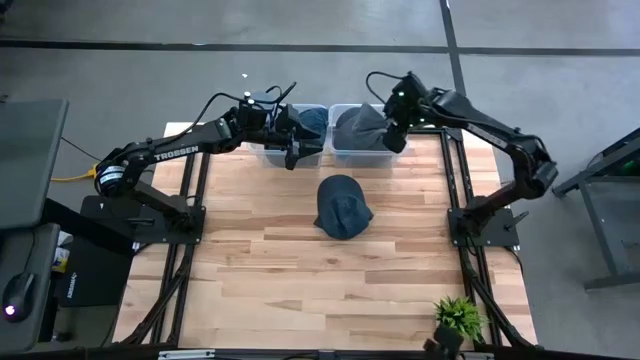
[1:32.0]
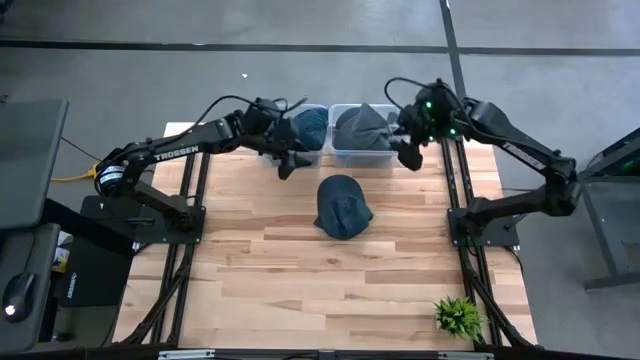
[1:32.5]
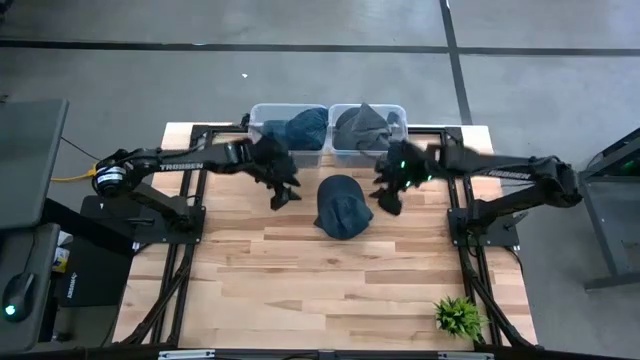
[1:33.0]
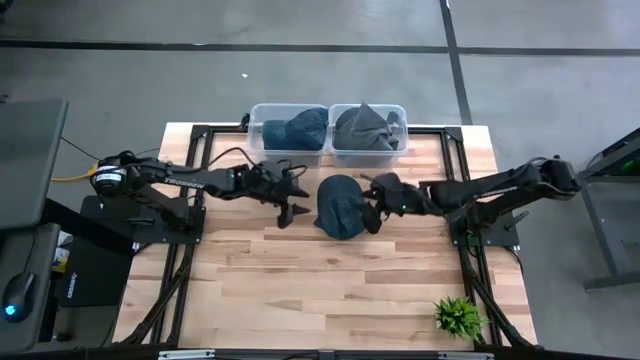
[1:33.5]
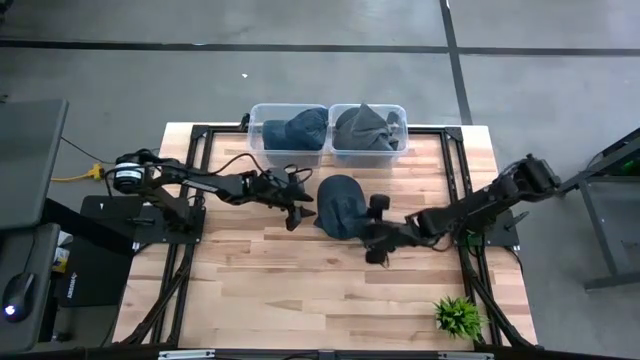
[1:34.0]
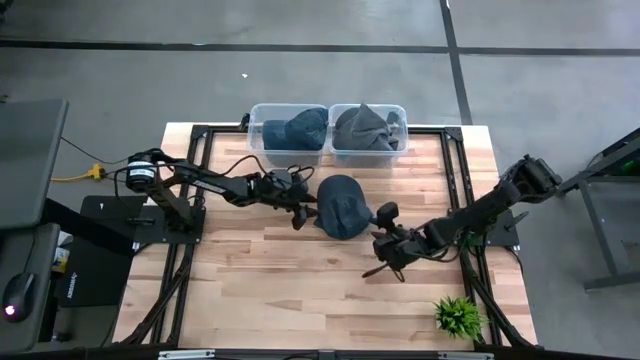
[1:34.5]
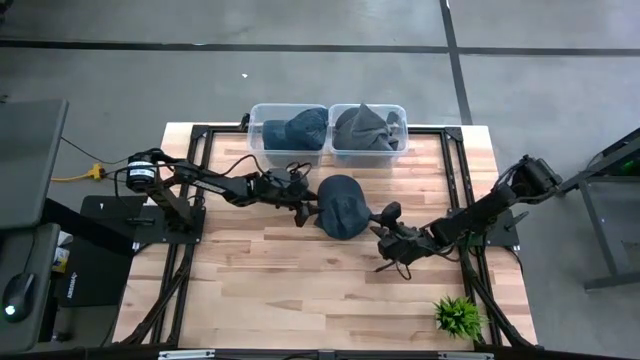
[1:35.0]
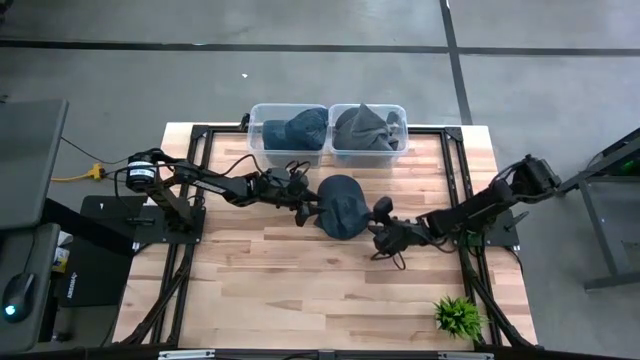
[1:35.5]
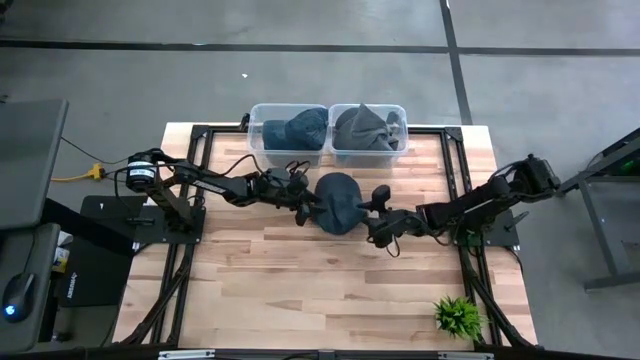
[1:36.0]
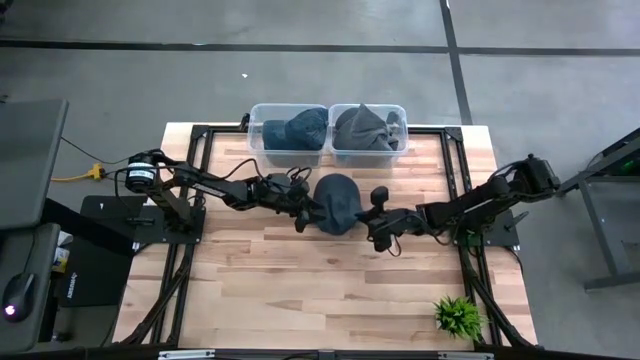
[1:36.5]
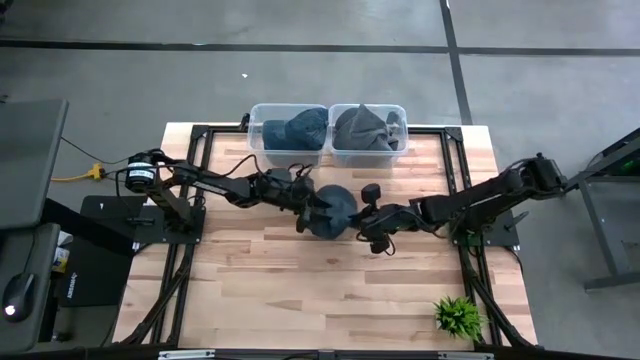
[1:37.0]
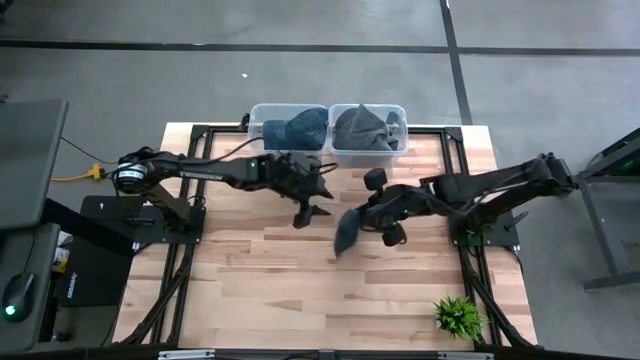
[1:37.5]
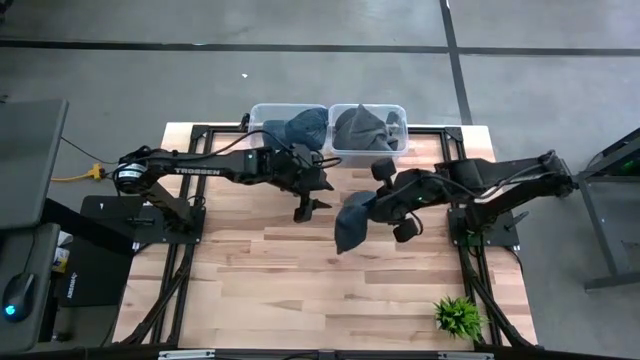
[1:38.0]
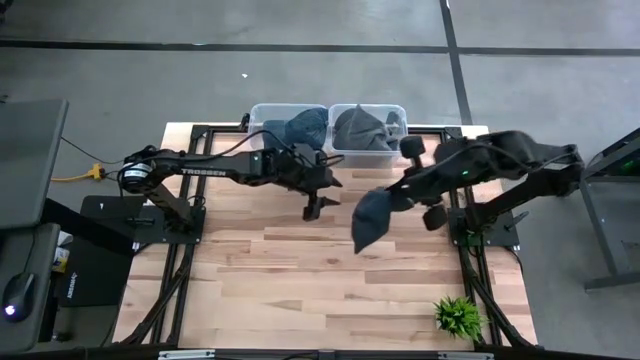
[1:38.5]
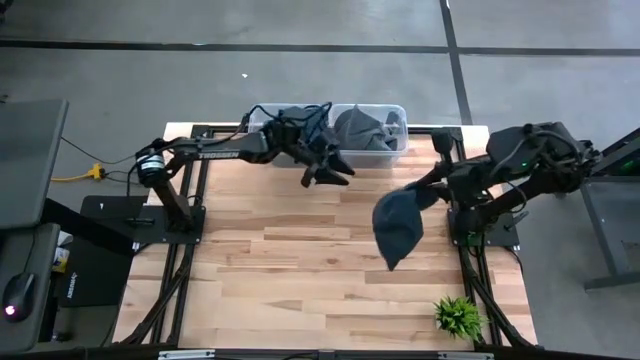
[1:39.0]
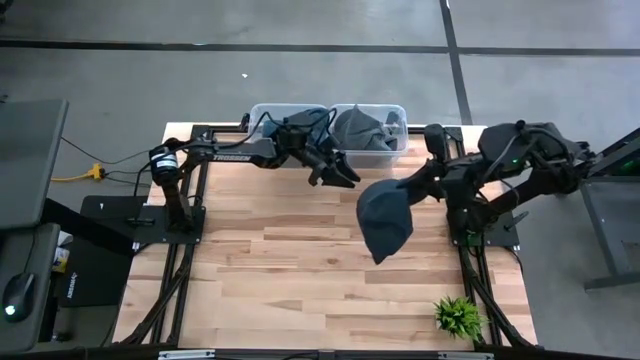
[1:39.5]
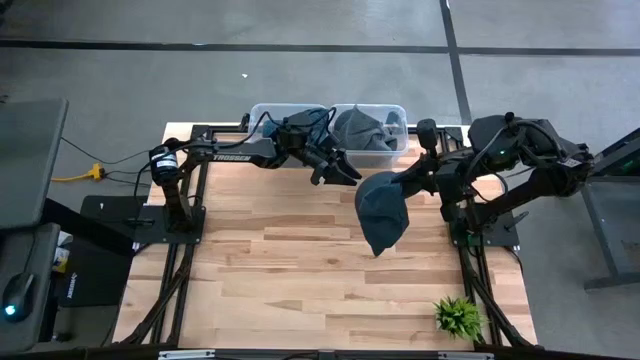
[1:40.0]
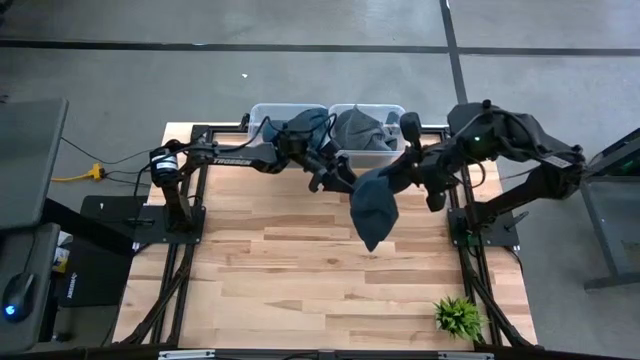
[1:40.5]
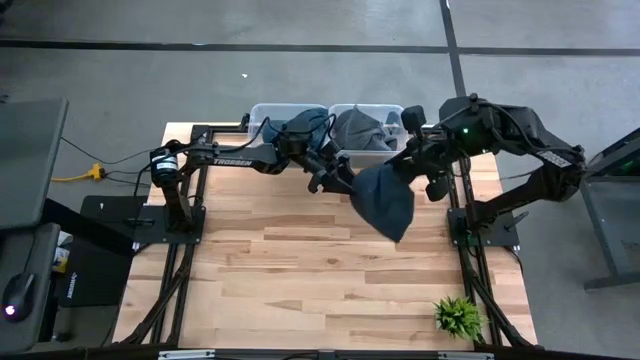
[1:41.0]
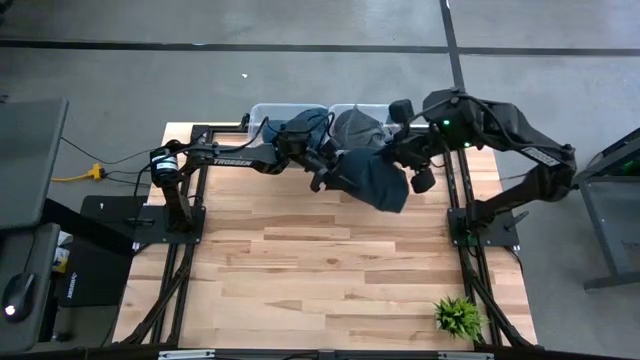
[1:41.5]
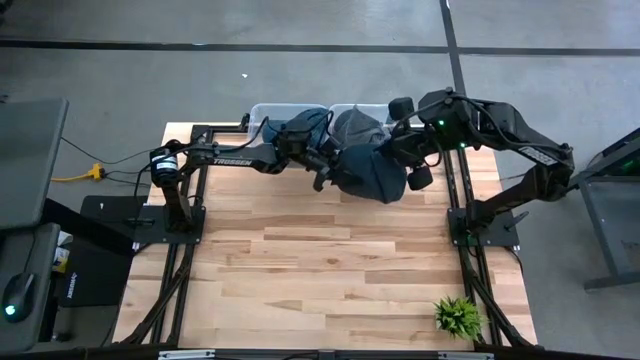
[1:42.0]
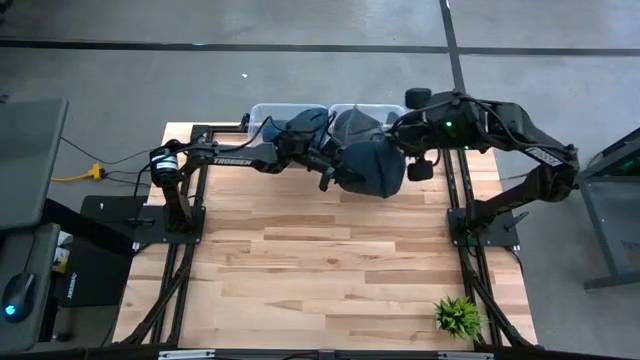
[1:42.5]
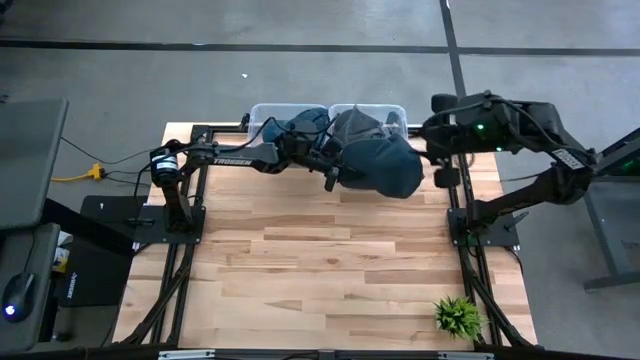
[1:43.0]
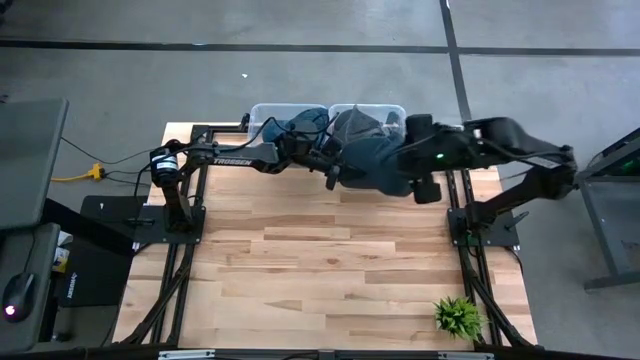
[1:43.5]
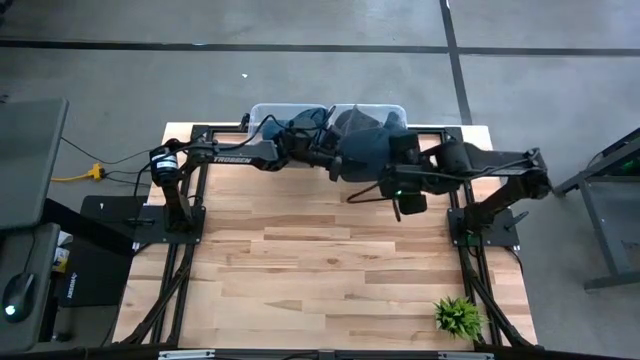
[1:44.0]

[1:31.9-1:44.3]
Task: Pick and place caps into container
Put the blue cap into the left transparent container

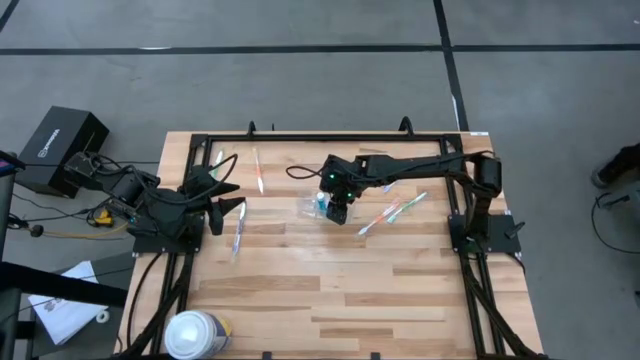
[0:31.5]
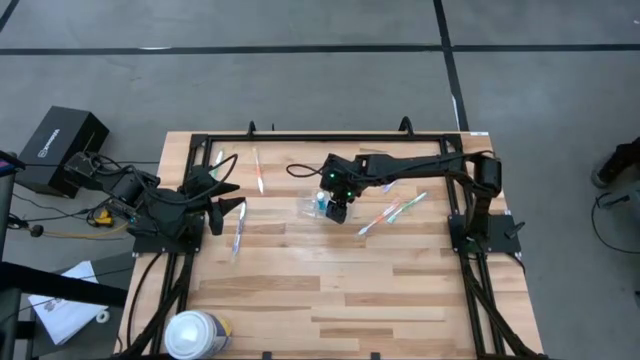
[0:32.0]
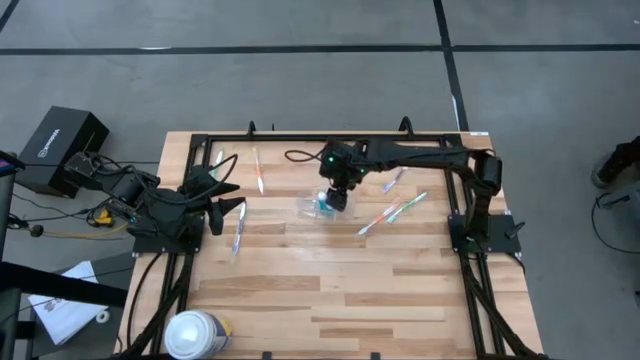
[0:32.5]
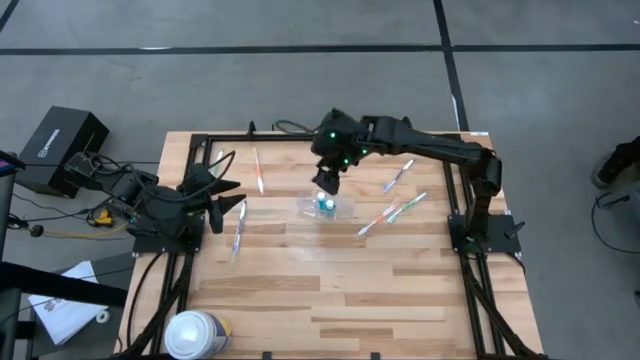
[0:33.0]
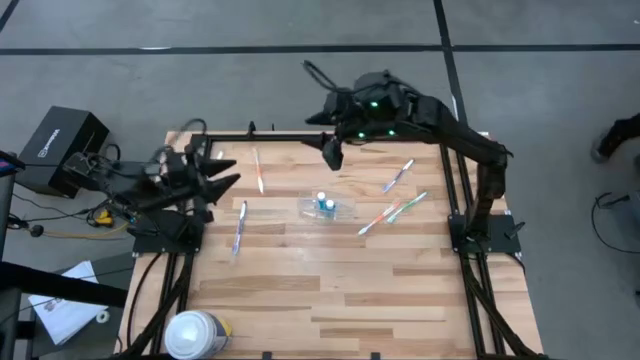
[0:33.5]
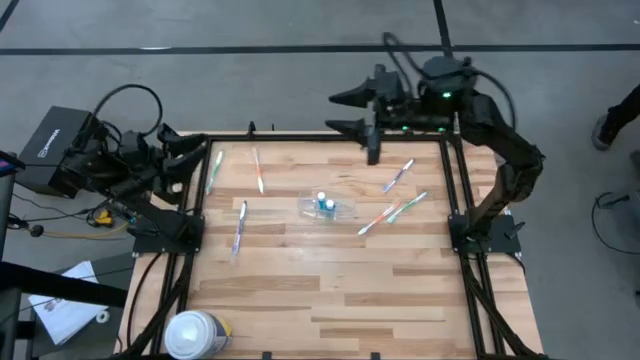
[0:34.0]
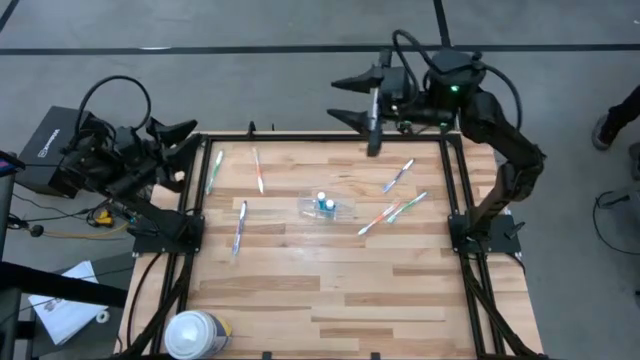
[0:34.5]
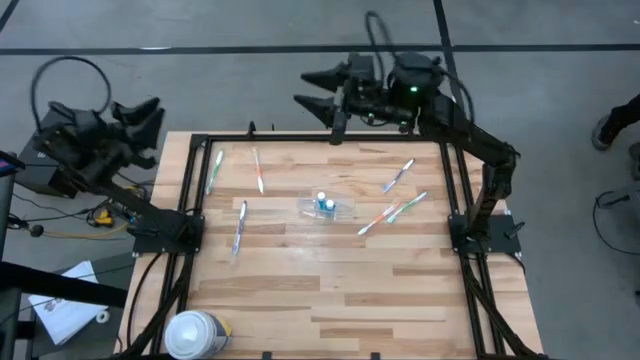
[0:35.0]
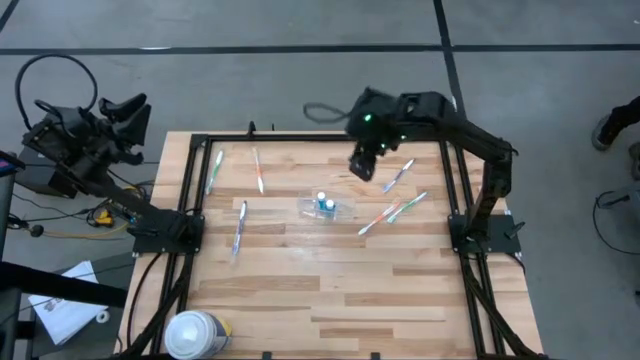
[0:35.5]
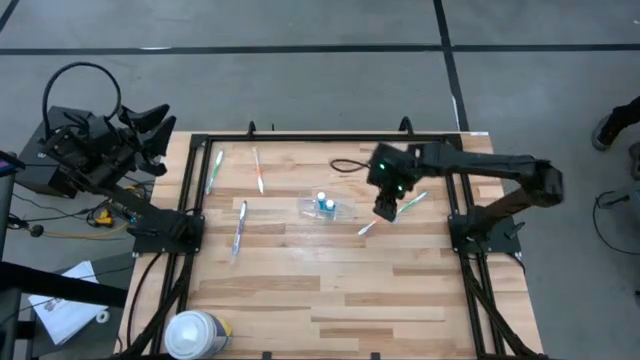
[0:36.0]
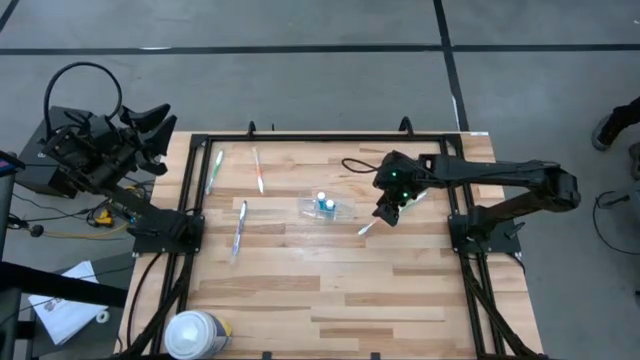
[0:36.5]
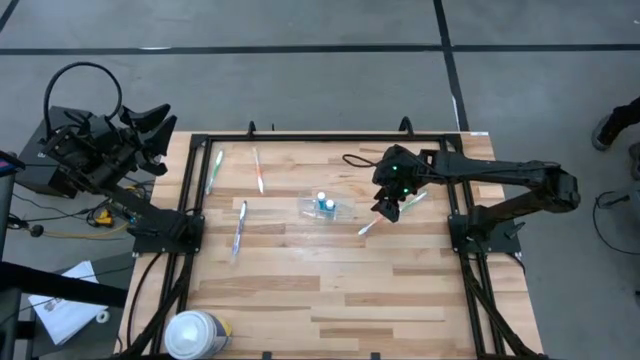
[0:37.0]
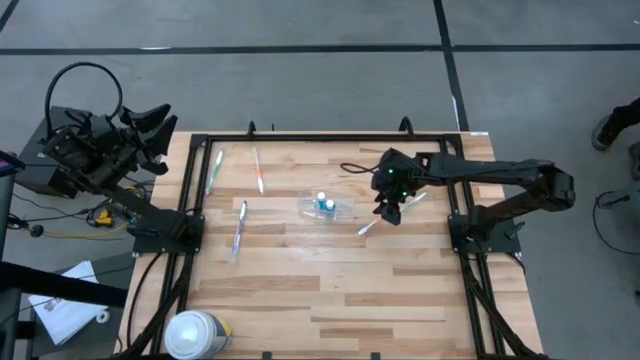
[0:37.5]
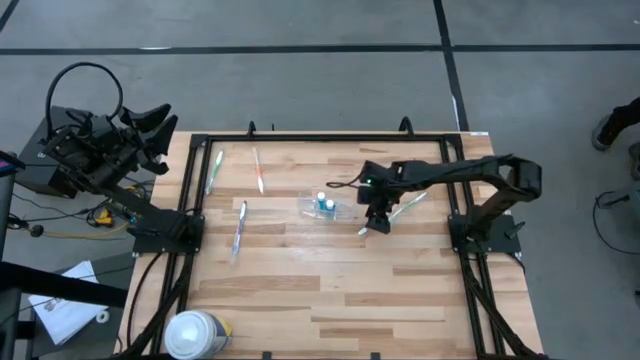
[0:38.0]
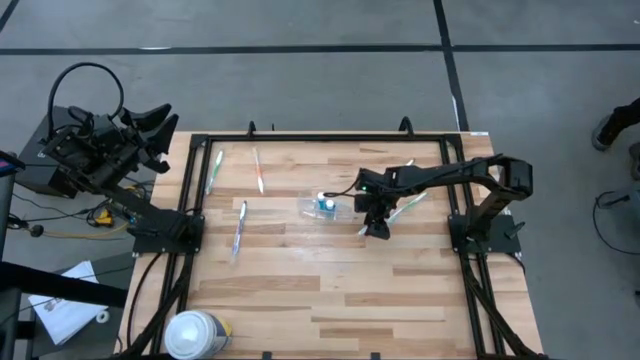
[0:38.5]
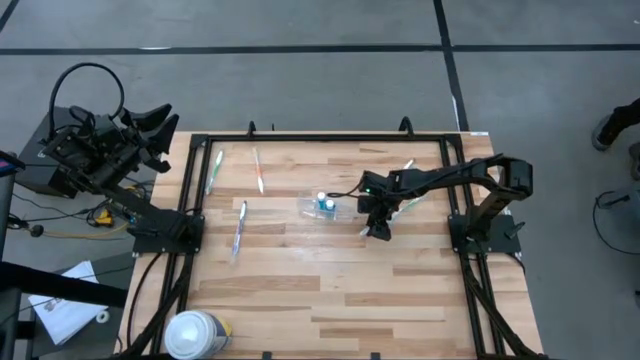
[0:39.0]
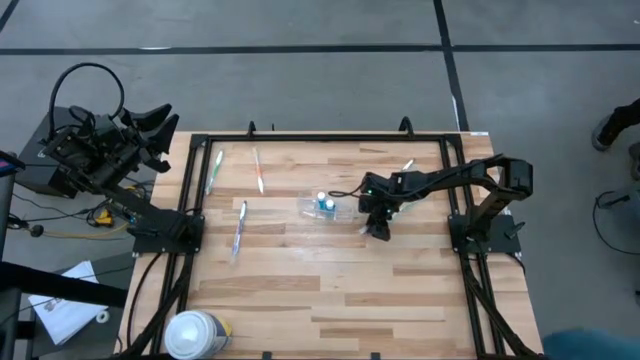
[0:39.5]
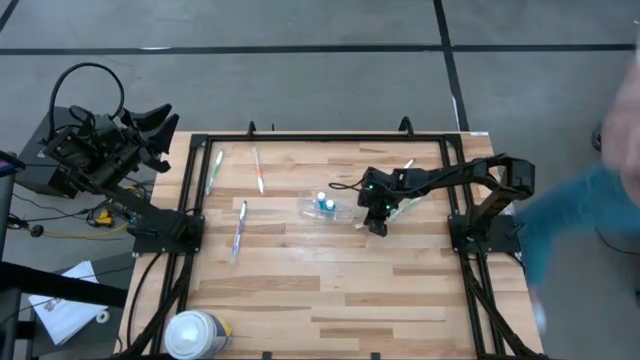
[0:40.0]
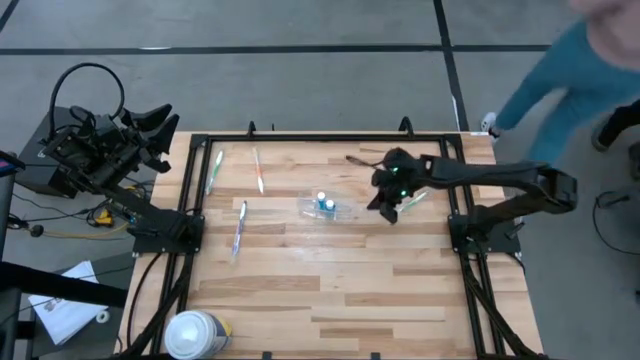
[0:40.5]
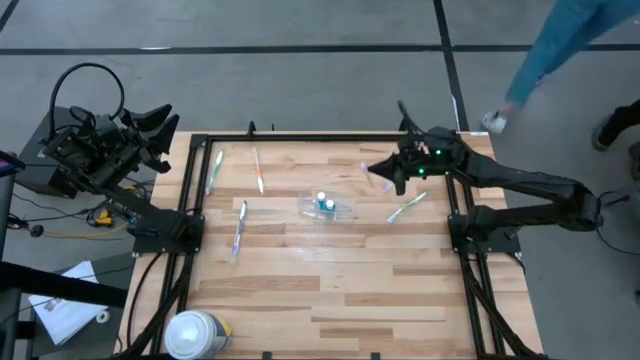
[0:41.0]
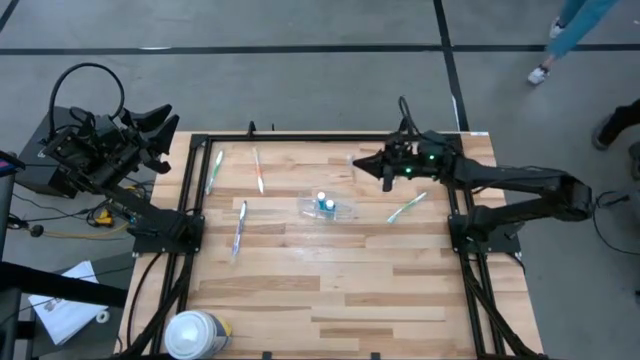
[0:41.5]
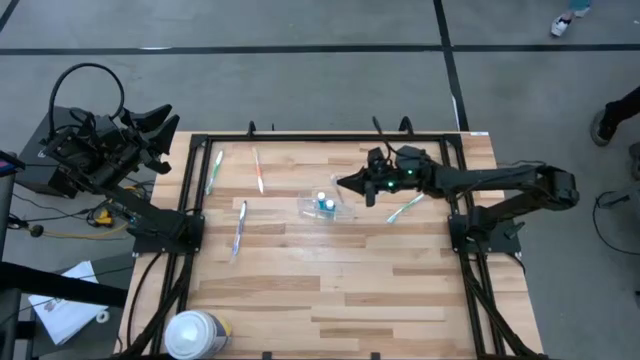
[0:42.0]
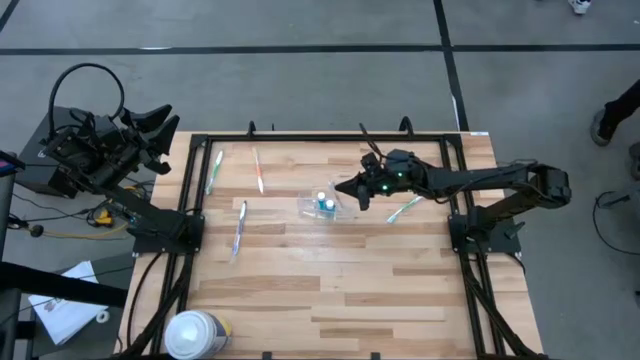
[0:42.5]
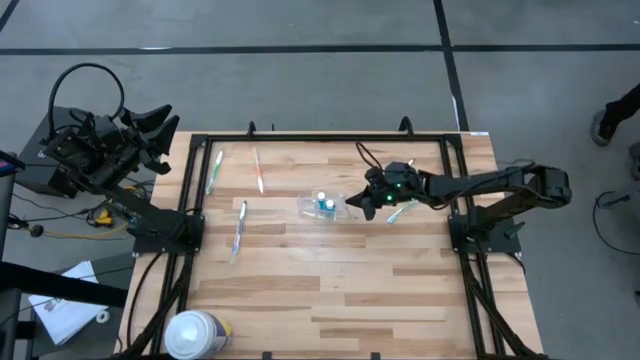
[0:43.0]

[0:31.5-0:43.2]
Task: Pick & Place toothbrushing station
Put the right orange toothbrush into the transparent organizer
